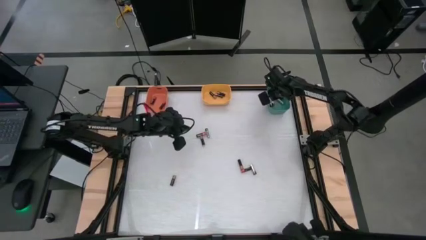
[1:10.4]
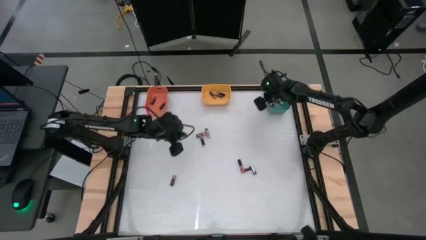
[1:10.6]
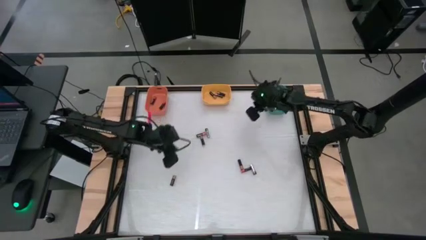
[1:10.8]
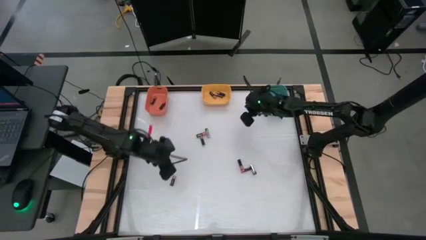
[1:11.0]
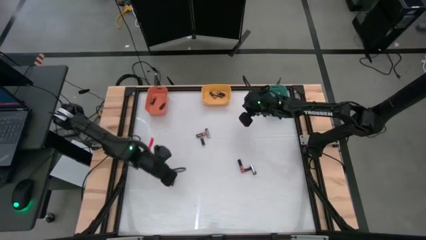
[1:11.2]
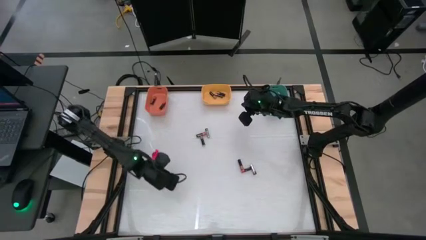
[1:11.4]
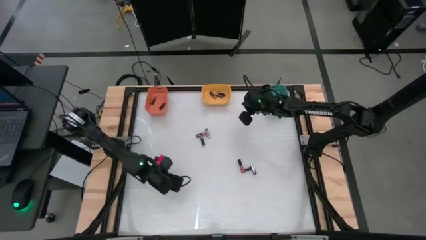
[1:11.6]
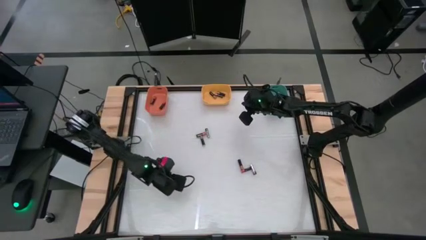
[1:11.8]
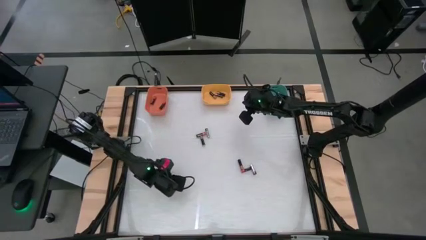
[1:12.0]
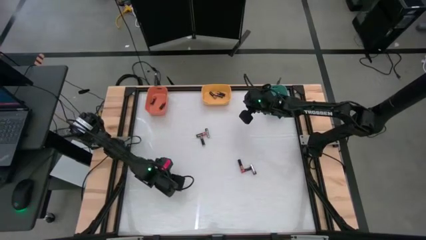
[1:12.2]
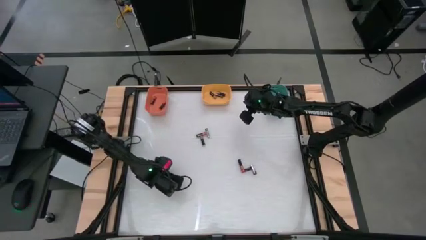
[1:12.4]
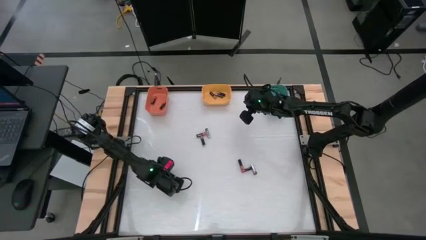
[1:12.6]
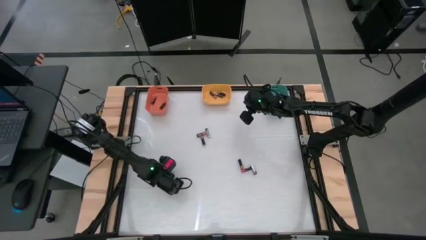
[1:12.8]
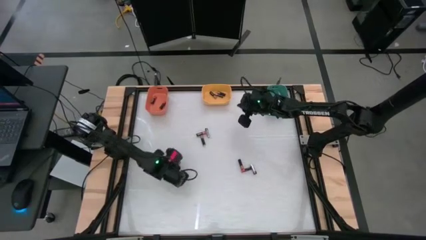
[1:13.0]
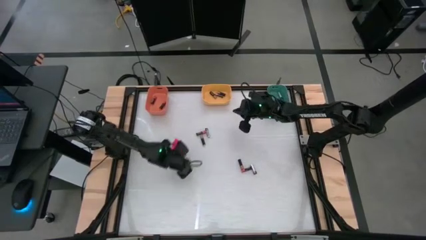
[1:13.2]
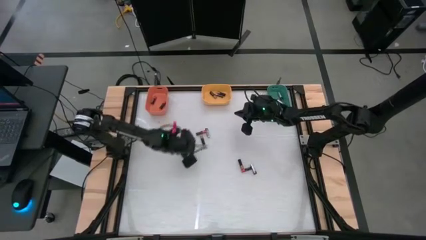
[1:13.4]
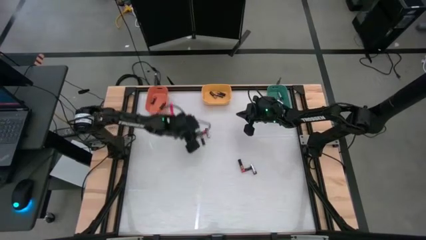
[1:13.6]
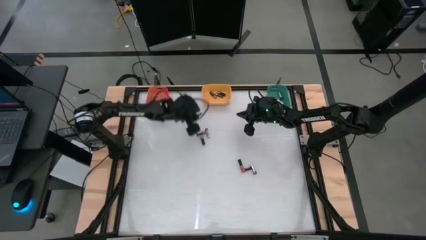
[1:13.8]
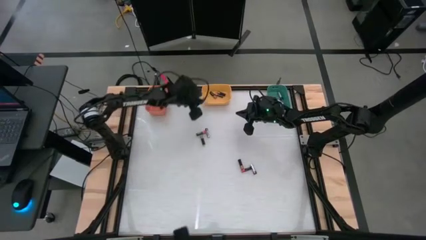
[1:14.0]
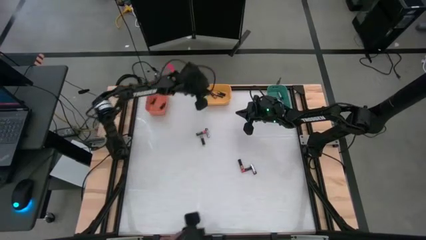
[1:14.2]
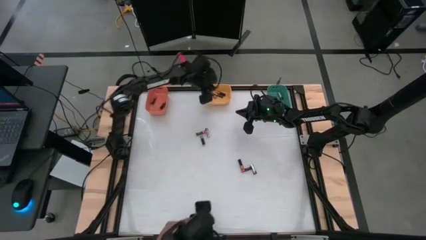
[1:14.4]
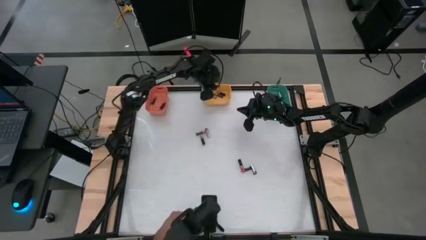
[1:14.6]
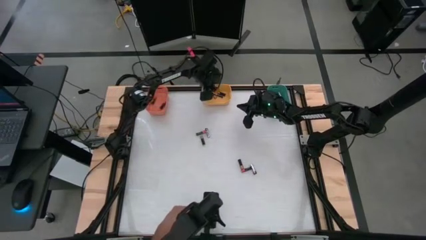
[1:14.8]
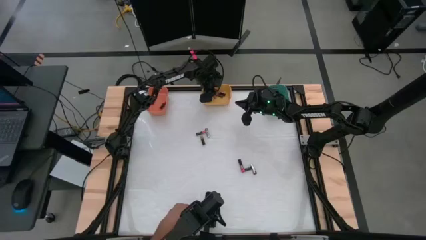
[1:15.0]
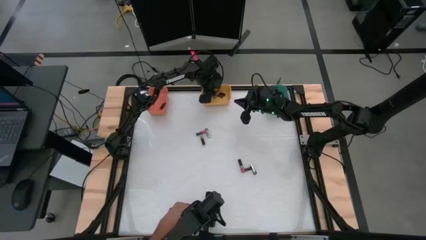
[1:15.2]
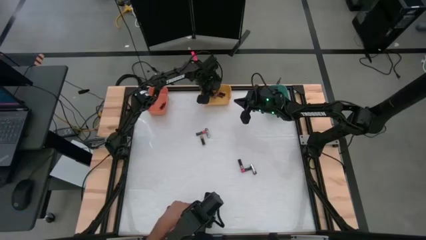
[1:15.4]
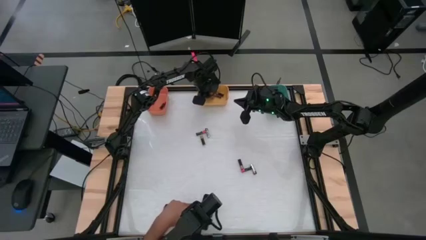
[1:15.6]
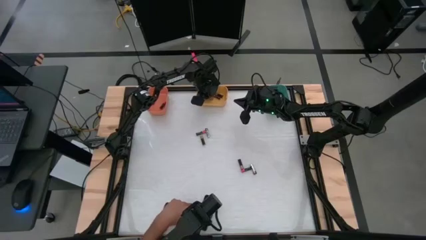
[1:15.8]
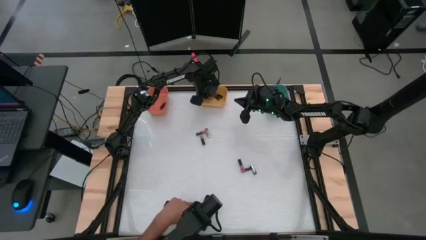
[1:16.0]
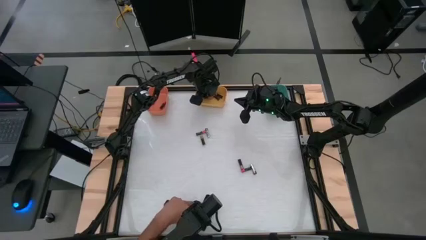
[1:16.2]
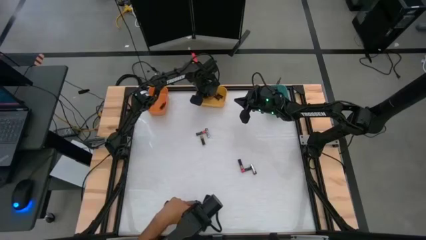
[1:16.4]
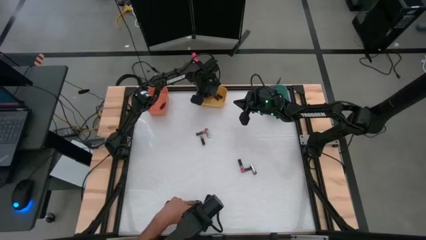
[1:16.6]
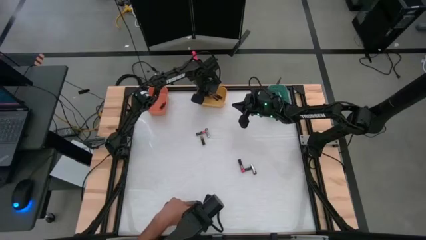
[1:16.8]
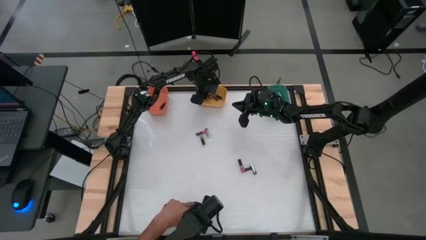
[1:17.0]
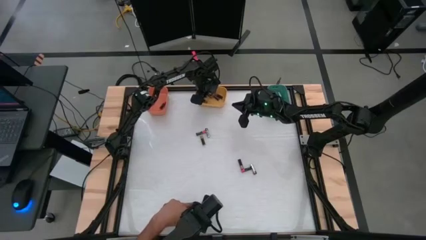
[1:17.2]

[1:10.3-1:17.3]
Task: Sort batteries
Put the gold battery into the yellow bin

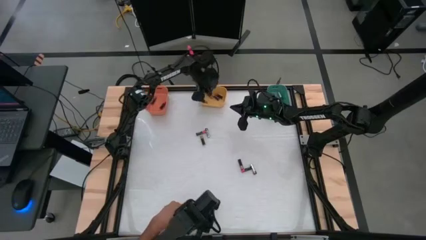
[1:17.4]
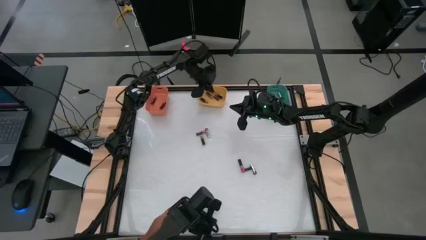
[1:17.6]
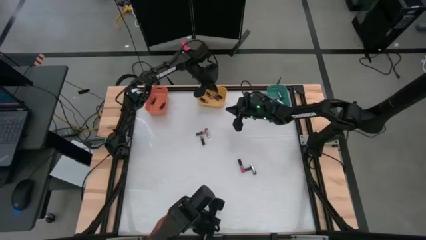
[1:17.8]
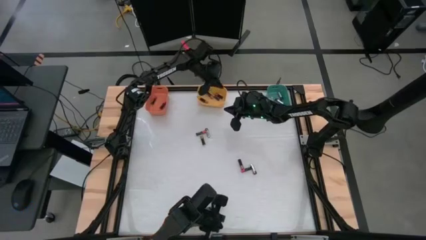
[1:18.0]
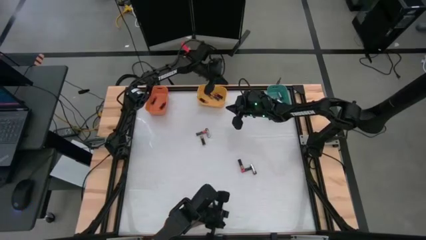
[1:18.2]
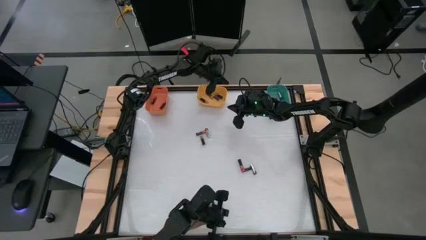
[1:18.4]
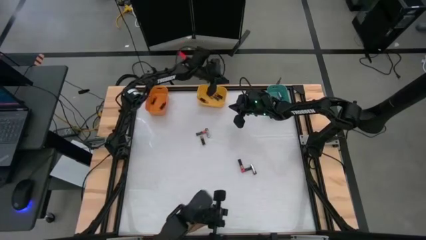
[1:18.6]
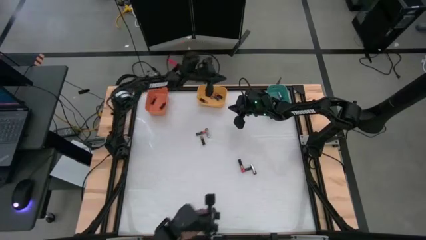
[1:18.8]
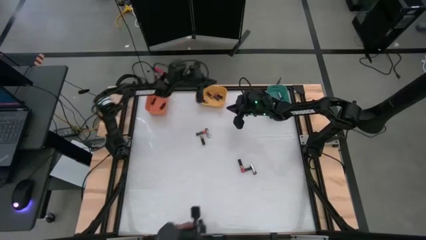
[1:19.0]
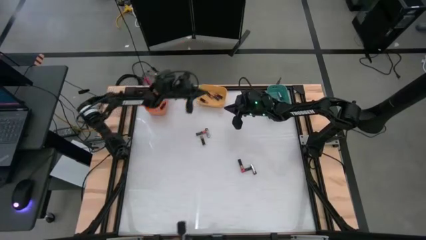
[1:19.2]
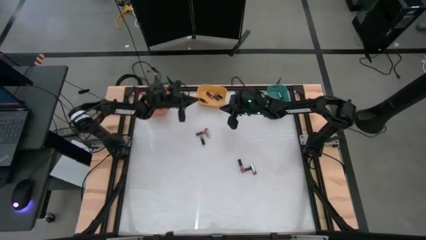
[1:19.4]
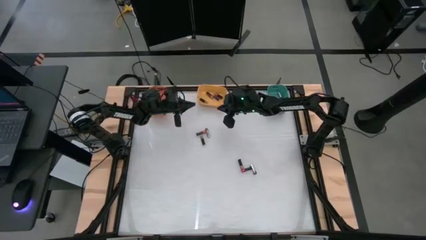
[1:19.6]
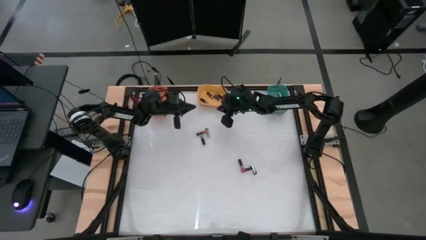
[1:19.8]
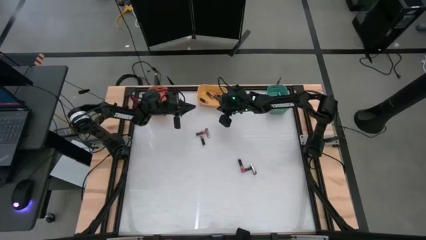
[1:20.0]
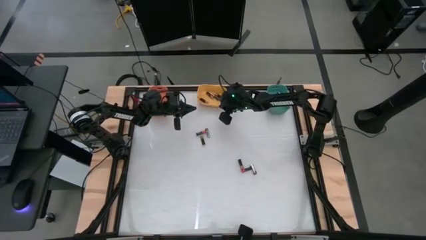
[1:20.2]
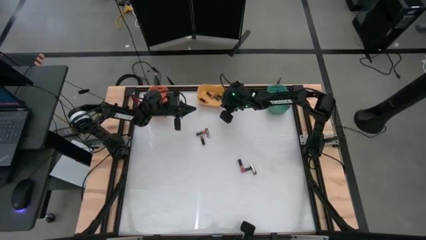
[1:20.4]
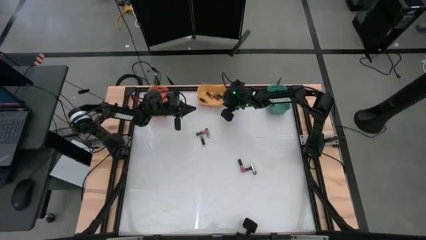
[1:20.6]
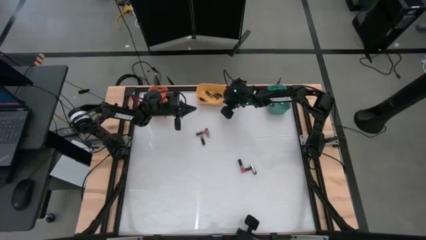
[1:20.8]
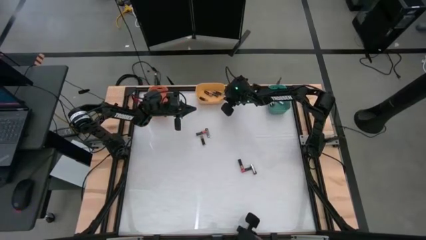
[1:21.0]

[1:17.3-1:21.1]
Adjust the yellow bin

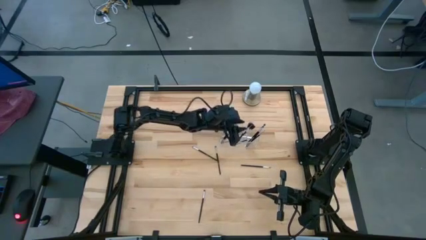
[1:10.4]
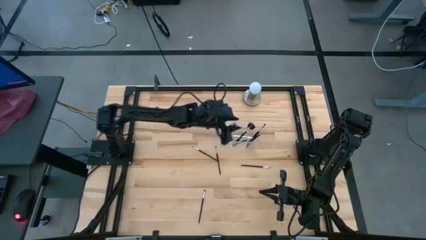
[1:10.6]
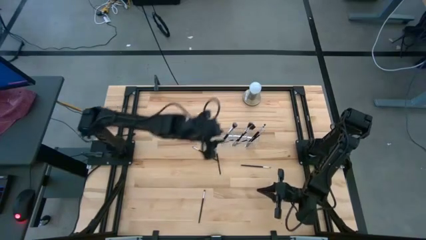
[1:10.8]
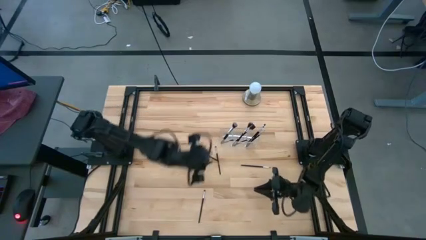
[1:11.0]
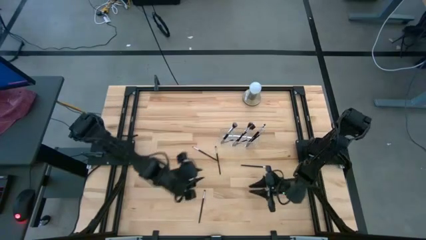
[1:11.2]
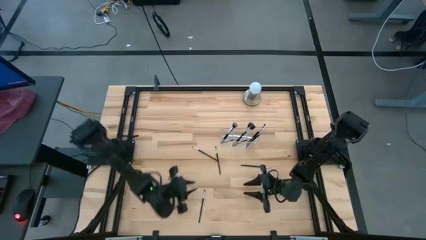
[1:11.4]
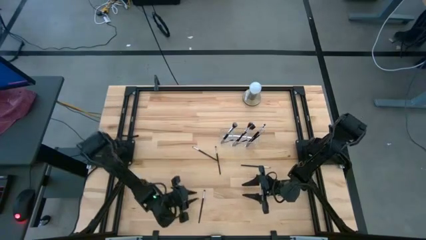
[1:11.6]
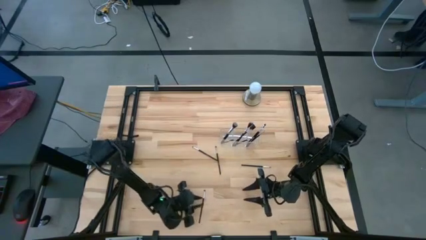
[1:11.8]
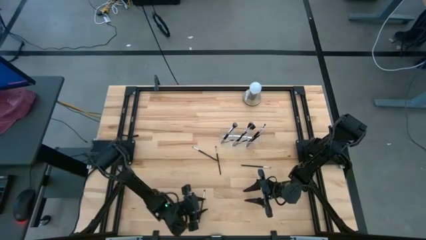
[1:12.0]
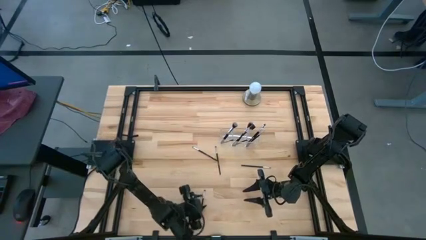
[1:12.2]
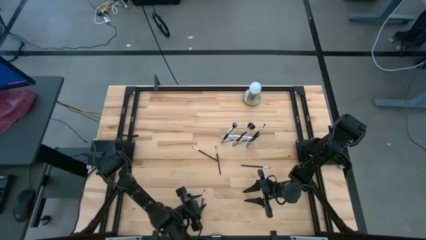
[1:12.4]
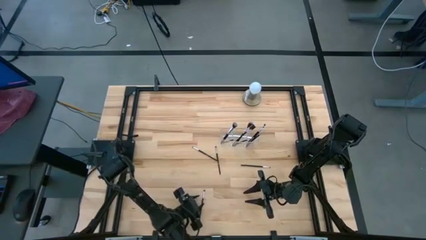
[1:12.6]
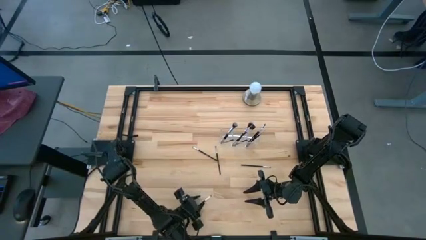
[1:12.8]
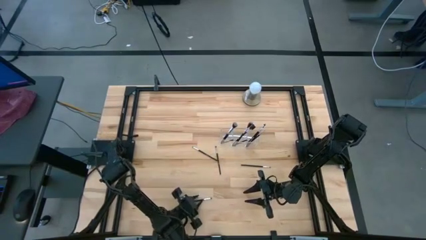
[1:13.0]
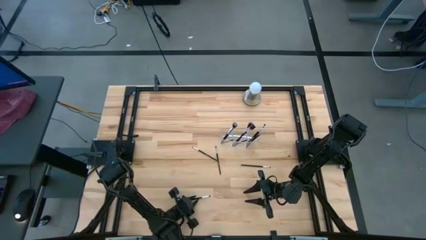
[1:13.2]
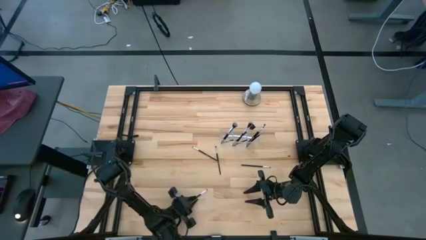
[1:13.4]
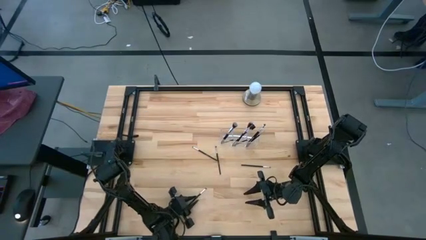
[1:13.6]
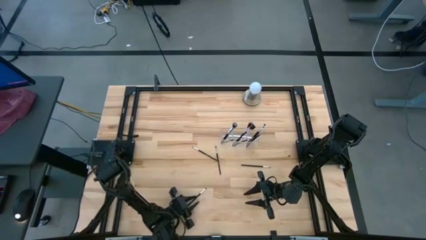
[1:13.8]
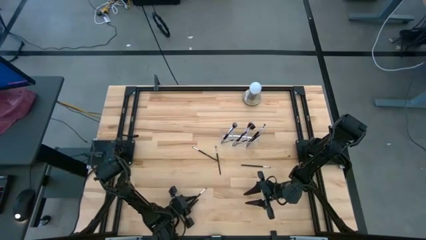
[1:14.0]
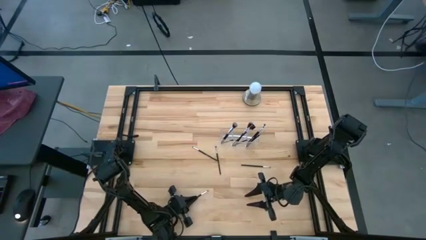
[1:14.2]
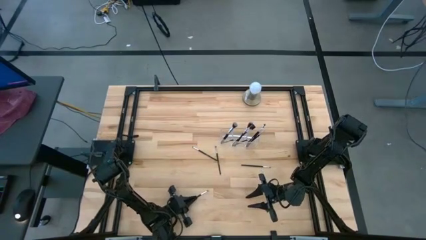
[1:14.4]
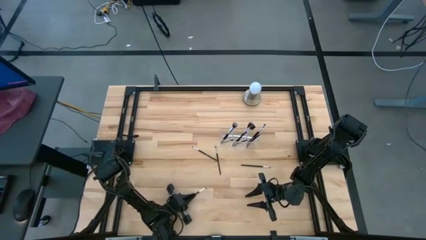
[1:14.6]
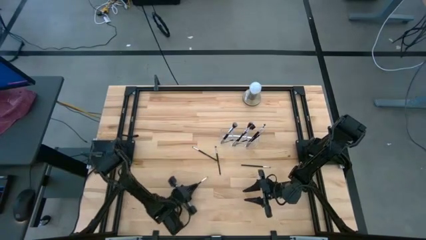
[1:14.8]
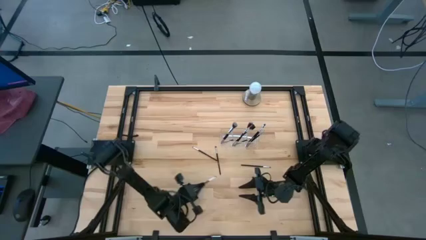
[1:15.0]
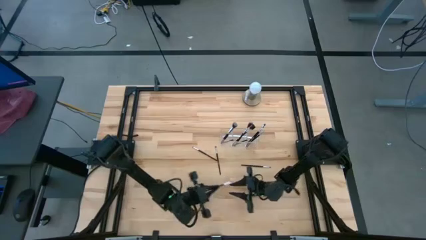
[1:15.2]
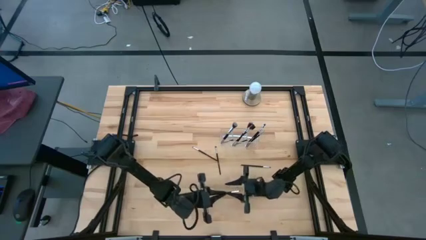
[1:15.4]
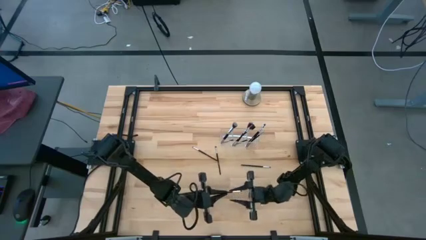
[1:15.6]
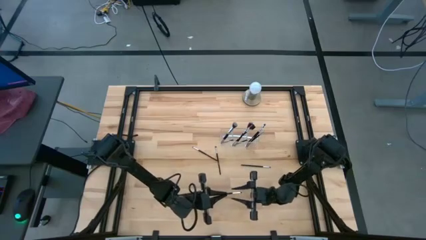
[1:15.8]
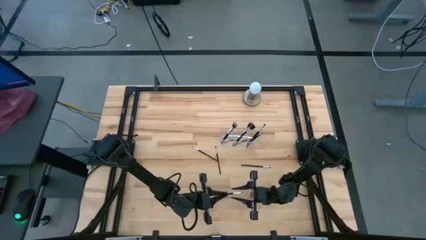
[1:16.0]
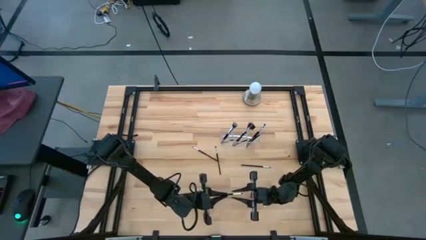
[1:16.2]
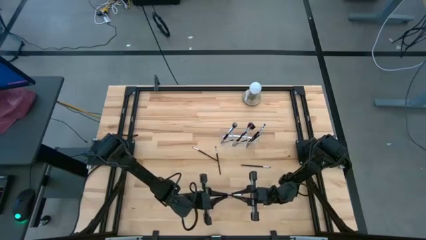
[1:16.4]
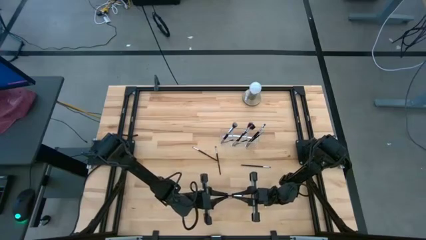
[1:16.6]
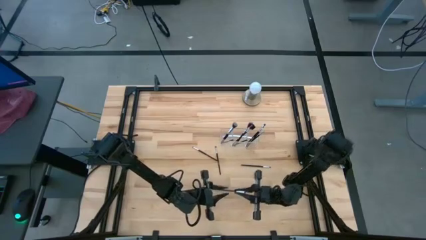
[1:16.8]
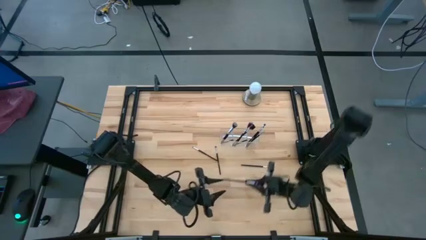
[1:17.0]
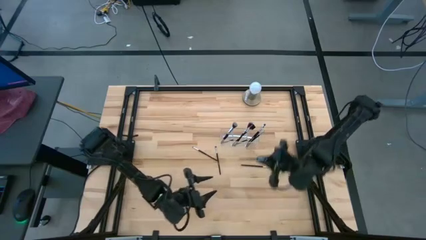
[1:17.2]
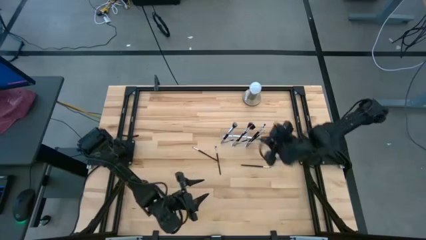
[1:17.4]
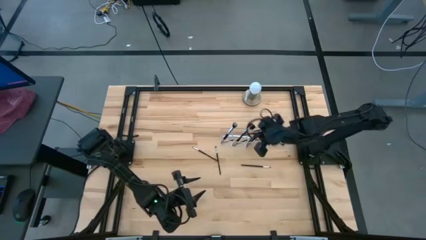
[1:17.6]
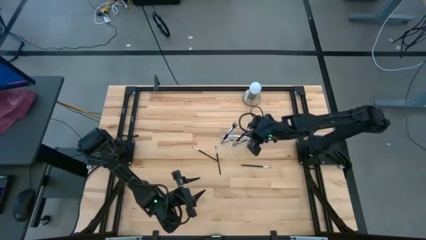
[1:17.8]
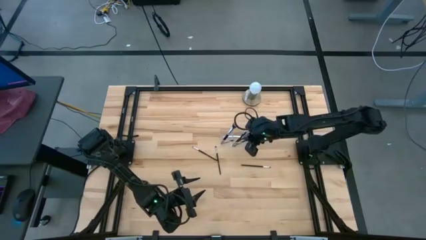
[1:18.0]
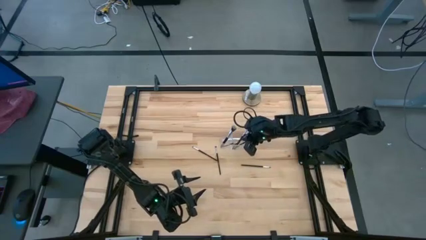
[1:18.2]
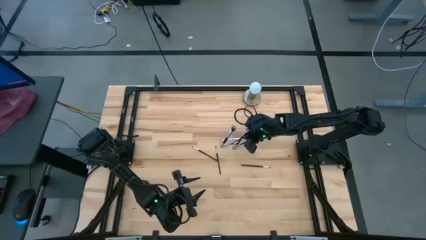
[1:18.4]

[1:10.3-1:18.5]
Task: Put items in baskets/containers
Put the black eyeshadow brush into the transparent organizer
